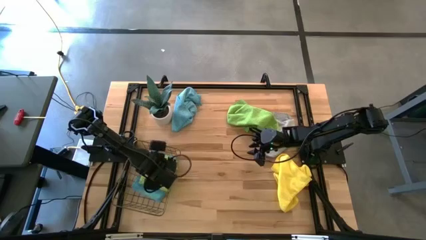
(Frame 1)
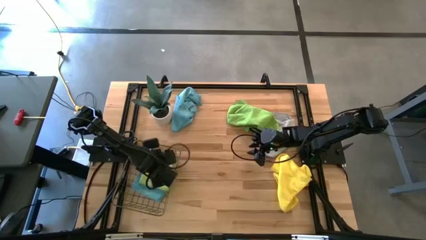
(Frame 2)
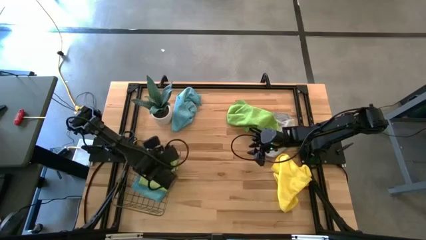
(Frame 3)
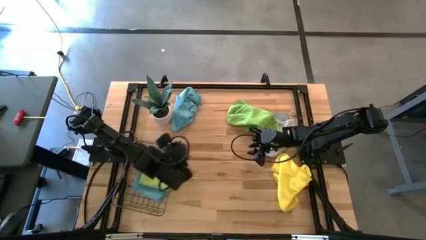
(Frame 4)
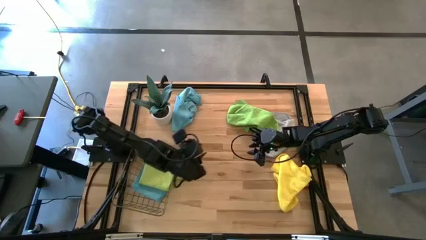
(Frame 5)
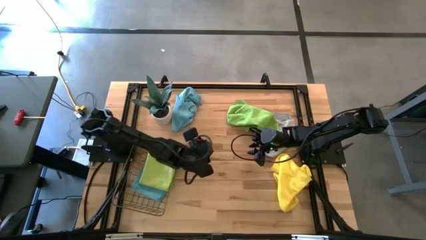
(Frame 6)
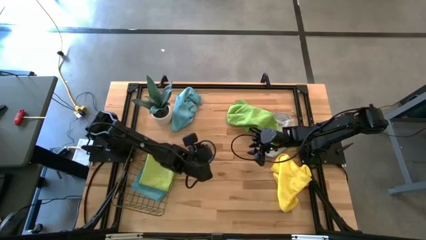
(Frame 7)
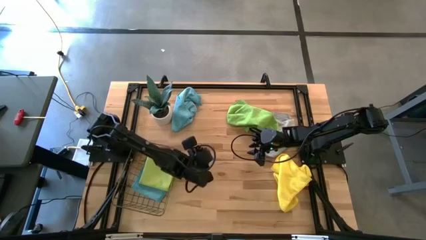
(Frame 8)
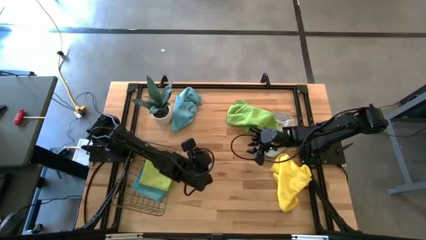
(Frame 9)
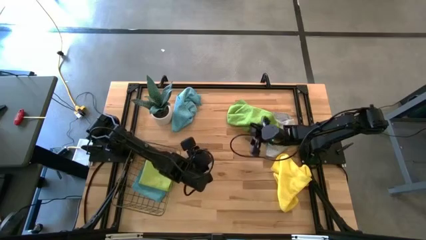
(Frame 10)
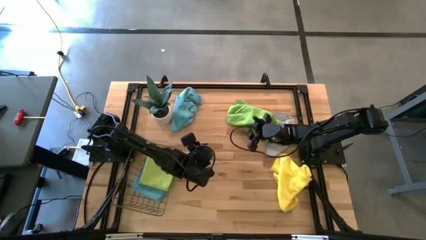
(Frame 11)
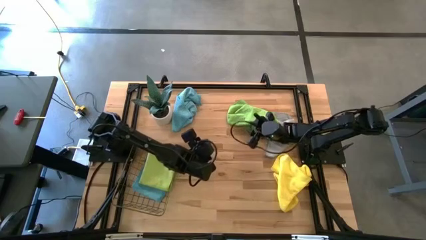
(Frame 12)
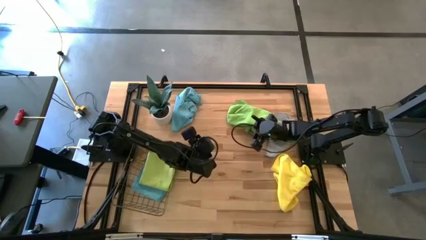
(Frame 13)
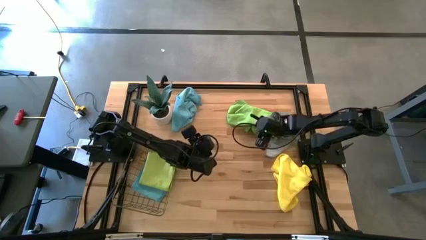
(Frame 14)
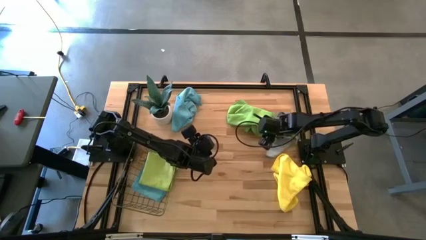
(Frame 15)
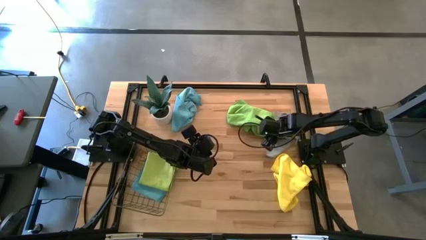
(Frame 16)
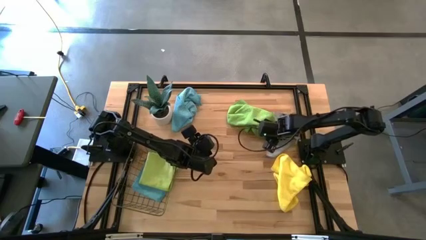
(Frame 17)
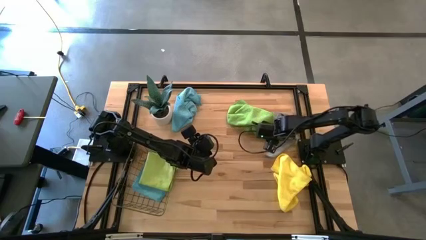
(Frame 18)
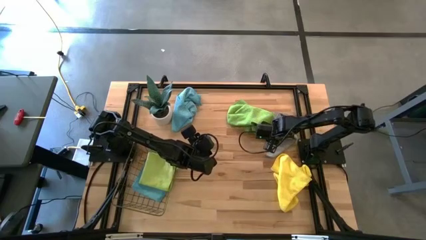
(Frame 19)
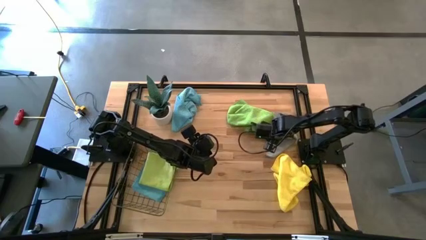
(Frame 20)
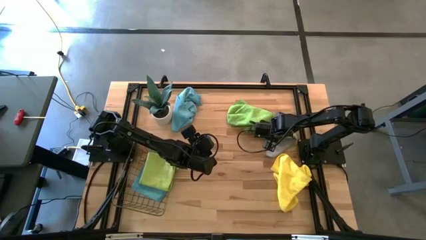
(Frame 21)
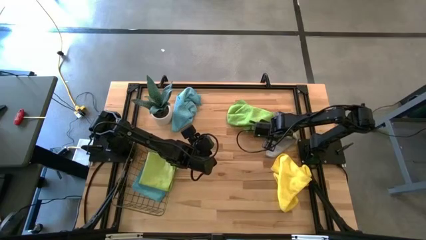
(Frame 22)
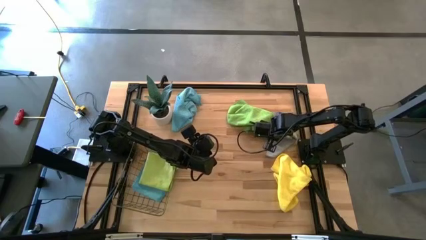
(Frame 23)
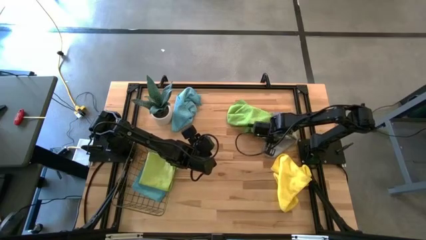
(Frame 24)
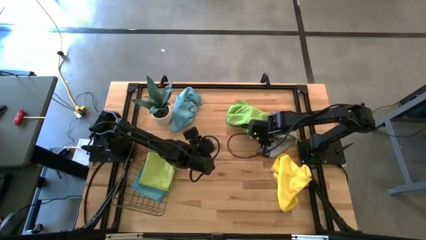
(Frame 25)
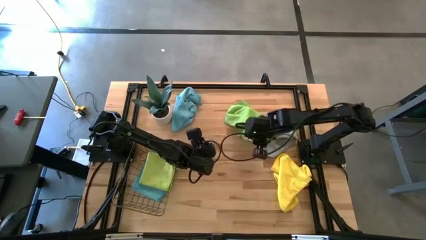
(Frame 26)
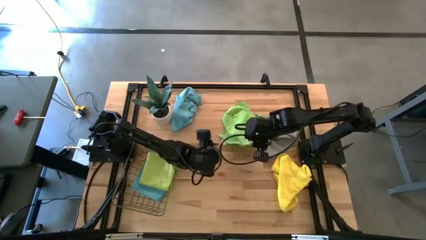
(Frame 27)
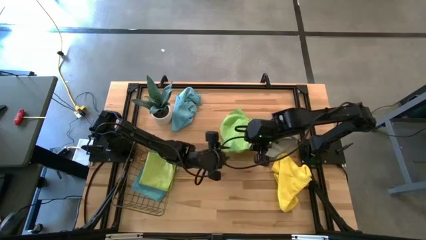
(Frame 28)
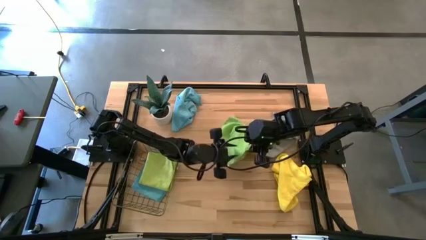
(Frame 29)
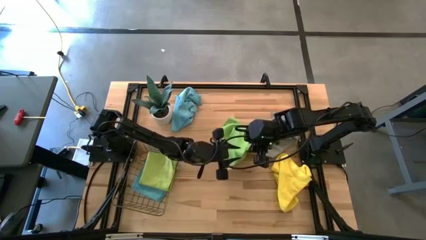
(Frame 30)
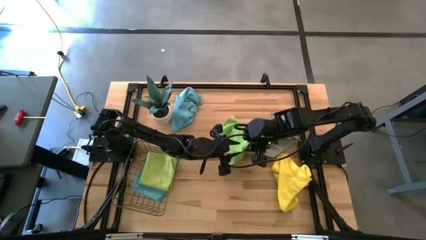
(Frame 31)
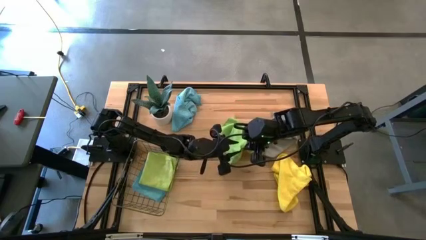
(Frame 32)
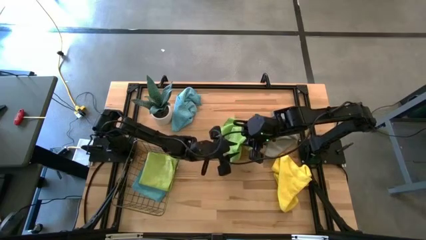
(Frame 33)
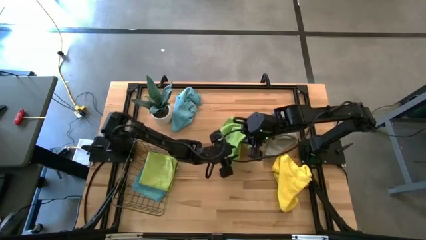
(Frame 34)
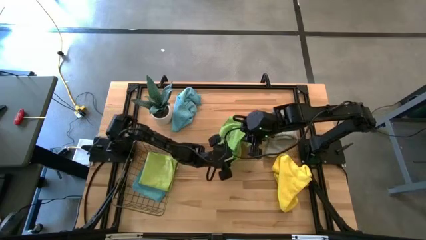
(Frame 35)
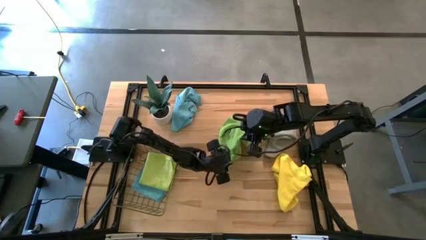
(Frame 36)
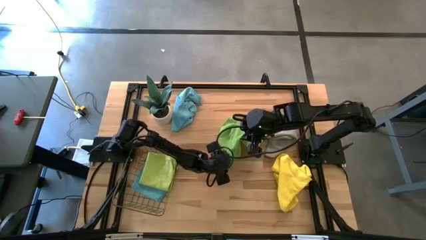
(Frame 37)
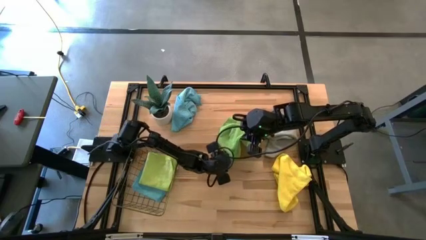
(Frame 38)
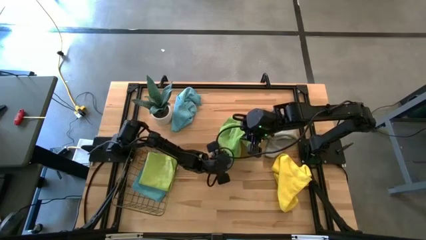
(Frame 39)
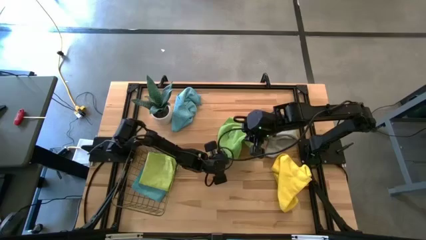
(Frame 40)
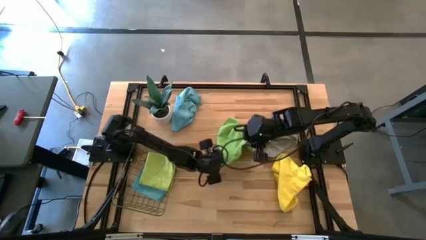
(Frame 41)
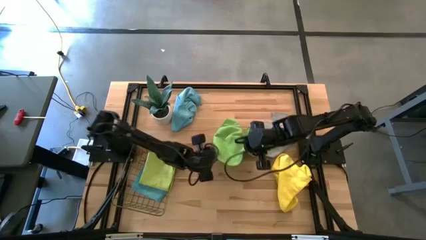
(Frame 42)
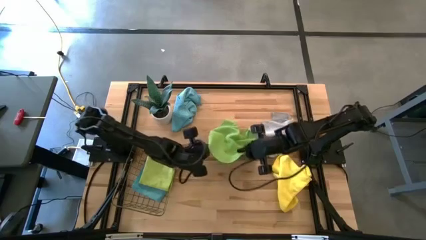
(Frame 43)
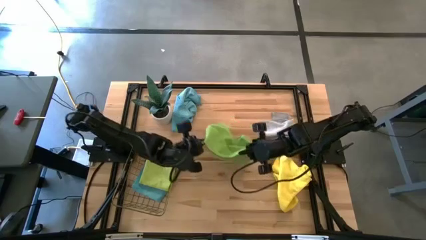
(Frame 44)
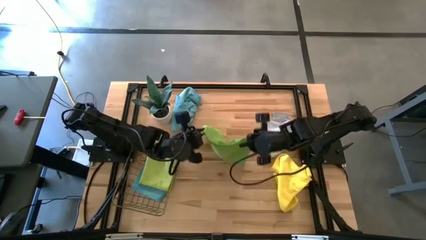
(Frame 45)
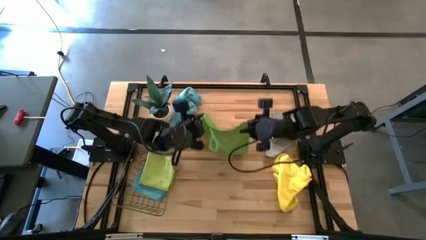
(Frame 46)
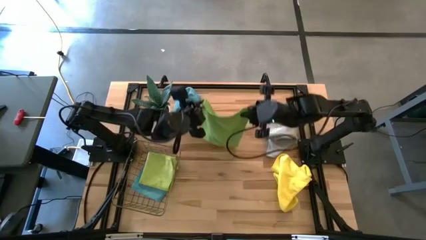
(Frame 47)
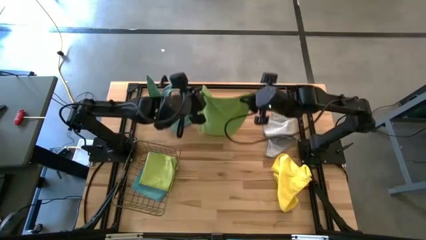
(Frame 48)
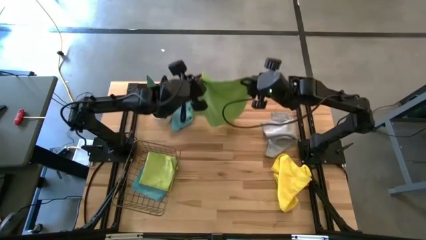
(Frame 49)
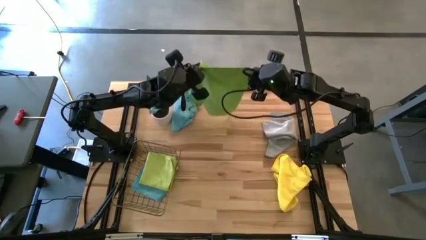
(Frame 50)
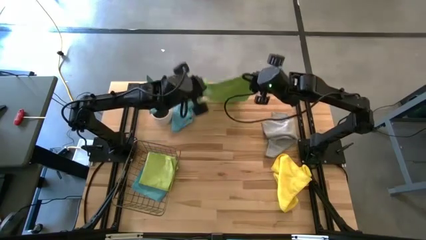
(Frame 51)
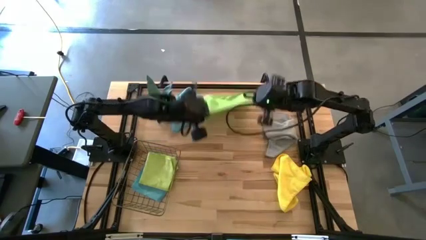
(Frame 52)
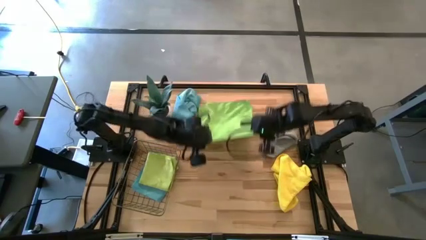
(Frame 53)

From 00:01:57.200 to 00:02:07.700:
Task: Fold microfiber towels
Fold the green microfiber towel

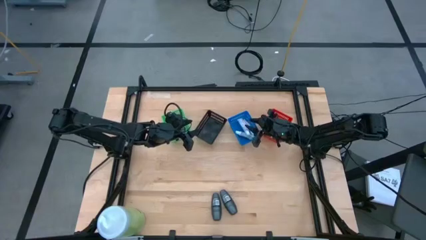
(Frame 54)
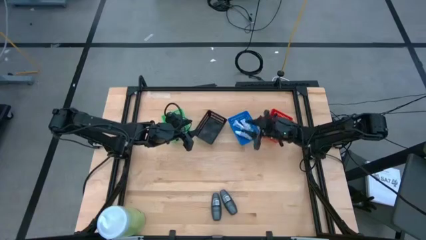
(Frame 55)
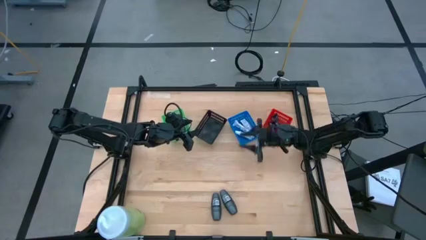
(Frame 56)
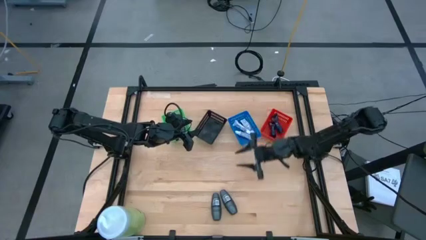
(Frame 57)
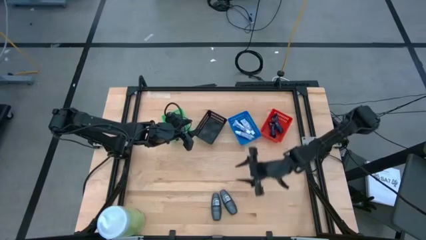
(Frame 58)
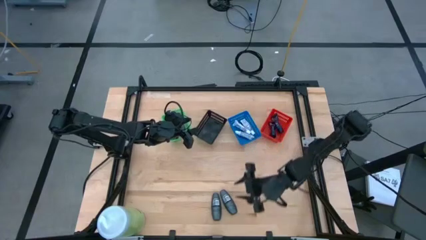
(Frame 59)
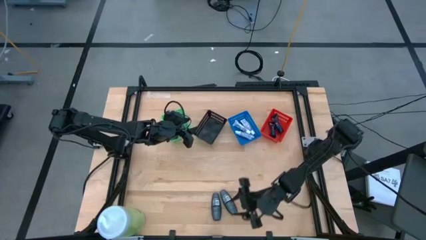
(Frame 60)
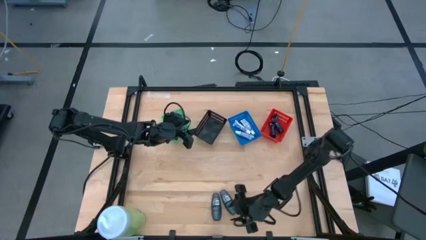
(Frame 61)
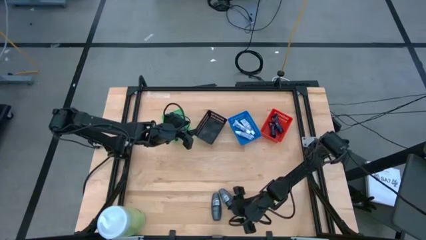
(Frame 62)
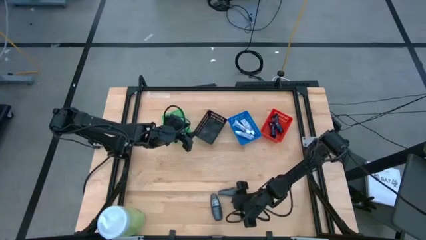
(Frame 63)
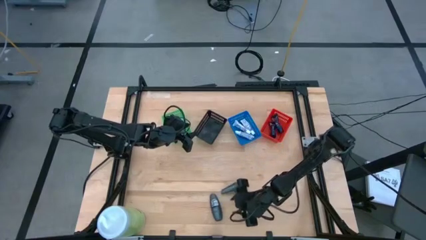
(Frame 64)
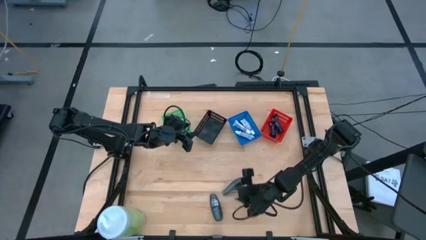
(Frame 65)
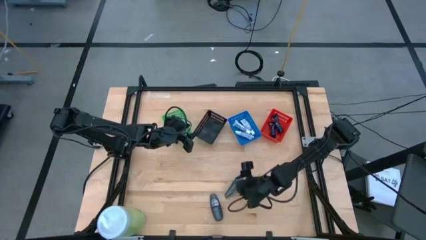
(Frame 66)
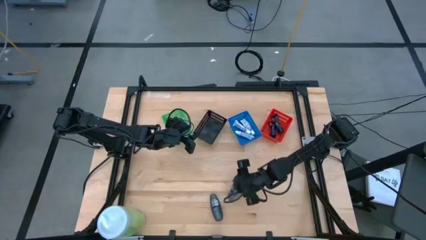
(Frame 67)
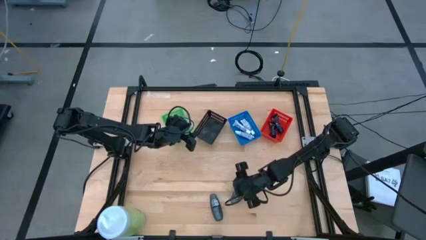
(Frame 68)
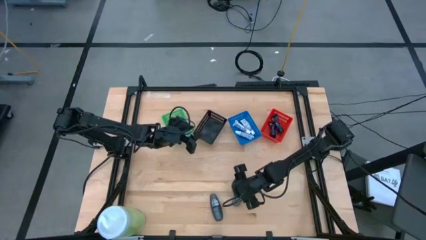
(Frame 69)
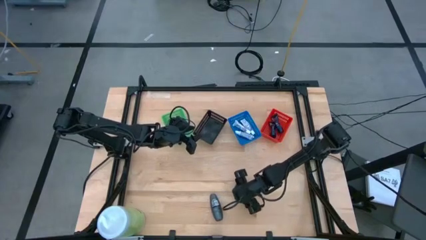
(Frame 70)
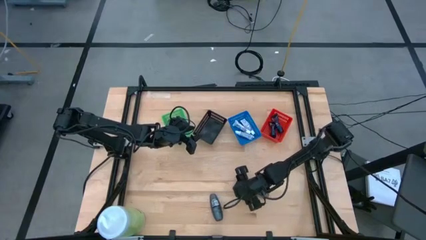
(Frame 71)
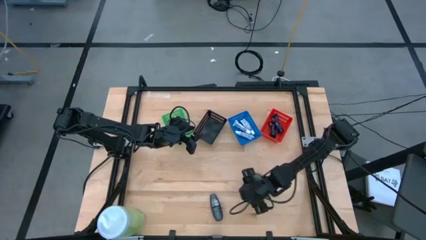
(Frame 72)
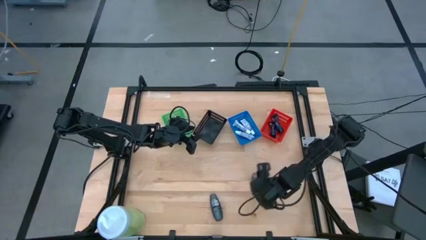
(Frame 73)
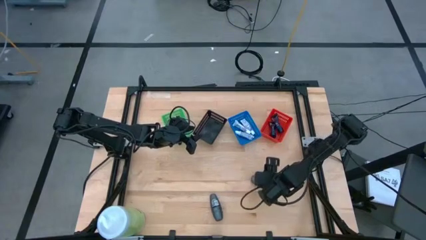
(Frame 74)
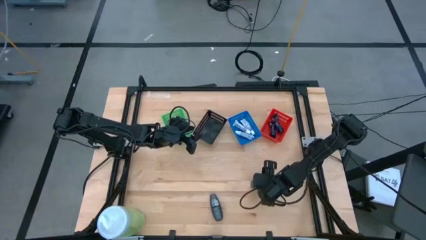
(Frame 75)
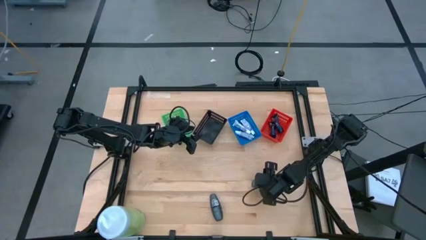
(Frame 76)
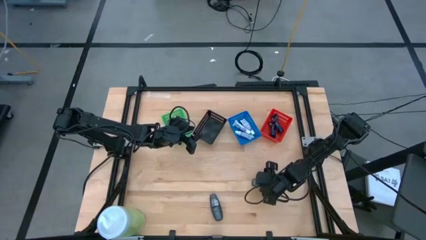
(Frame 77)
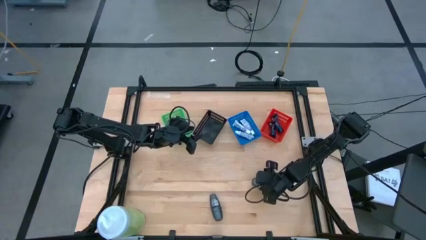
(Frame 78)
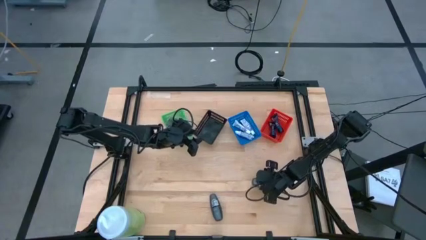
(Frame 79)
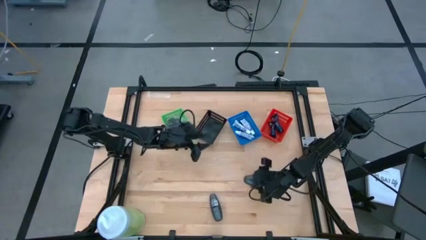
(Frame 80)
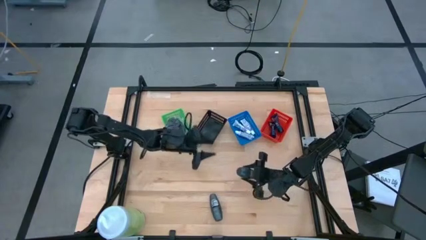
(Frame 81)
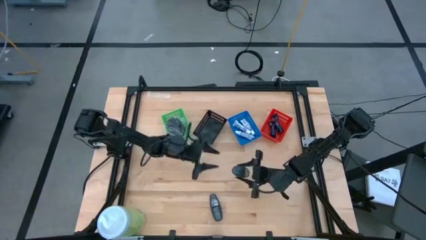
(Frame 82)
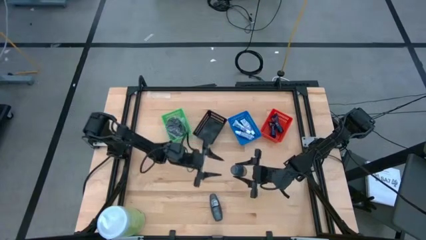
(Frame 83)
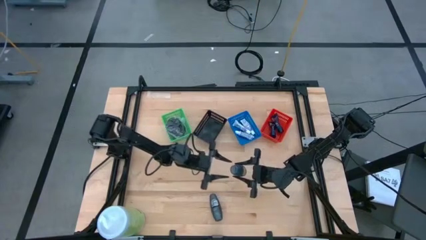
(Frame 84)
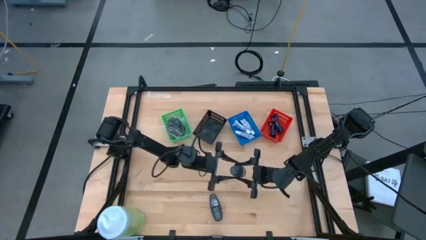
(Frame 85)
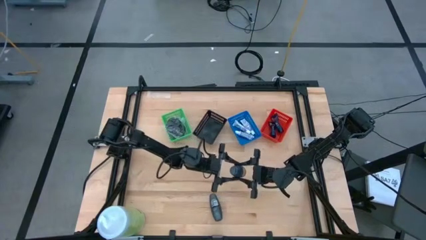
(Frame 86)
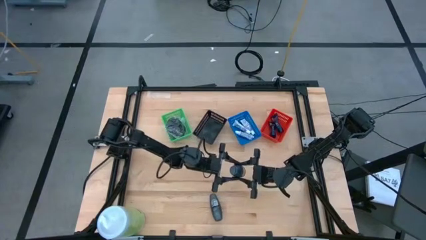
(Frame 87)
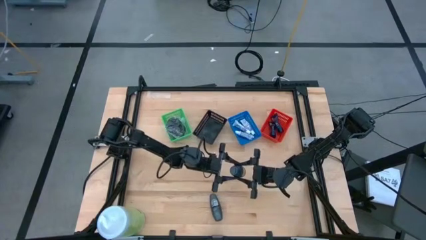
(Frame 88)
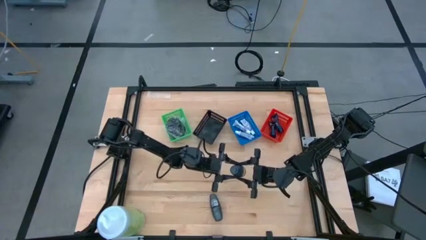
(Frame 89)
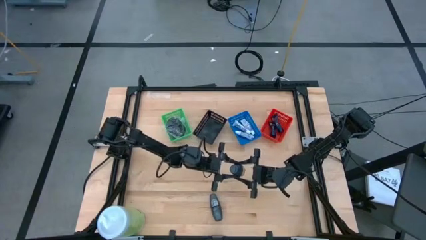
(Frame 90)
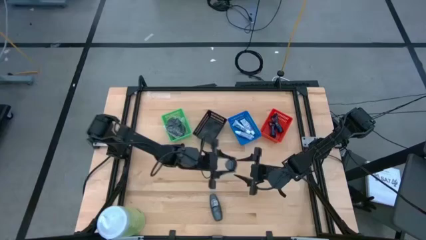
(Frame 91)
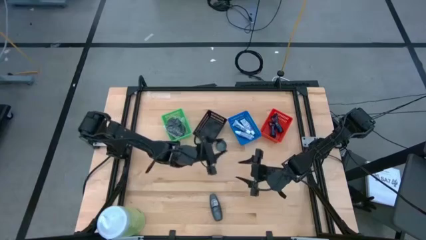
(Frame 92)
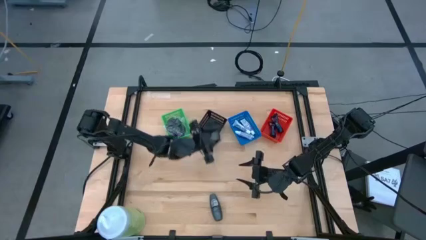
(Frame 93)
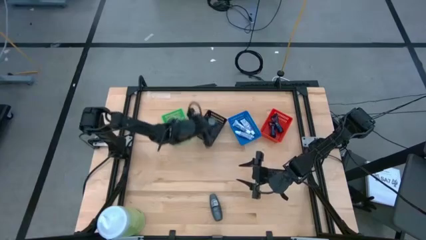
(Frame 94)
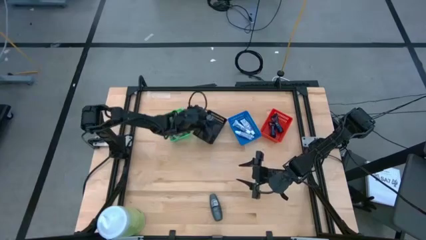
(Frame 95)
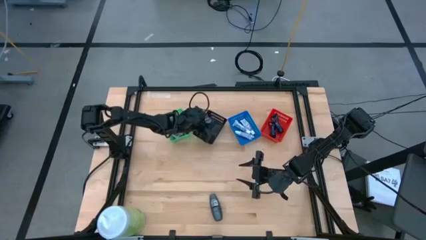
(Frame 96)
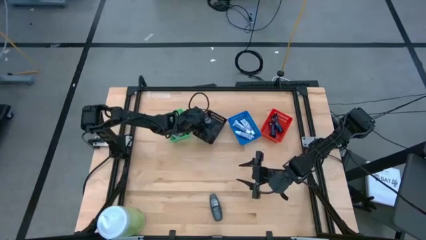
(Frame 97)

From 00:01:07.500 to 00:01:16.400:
Task: Pick & Place Travel size toiletries
Put the right black roll-on deodorant into the black bin
